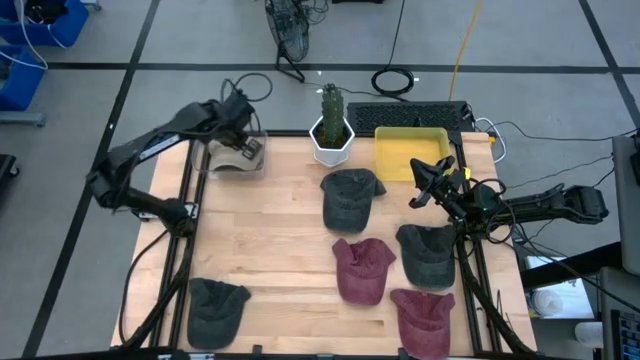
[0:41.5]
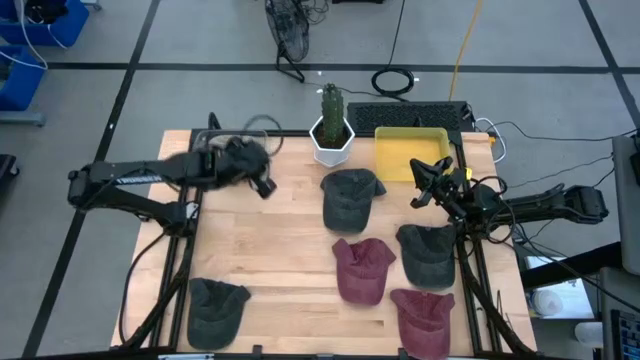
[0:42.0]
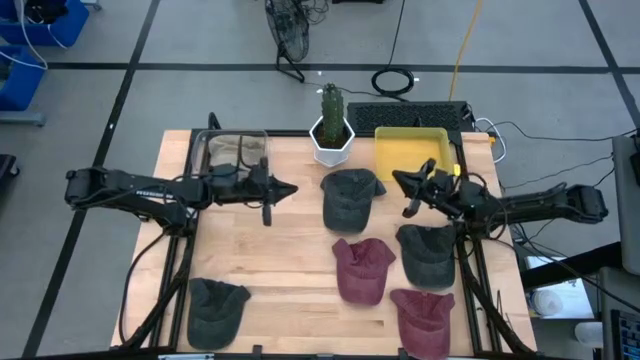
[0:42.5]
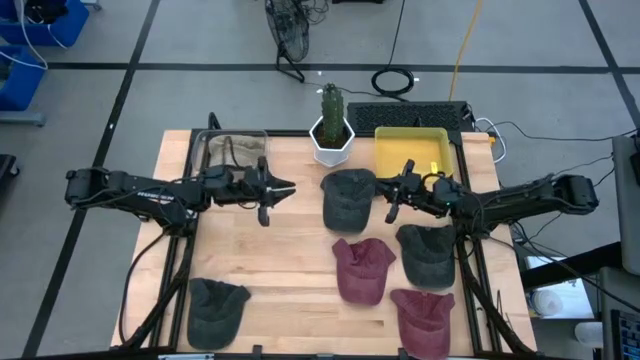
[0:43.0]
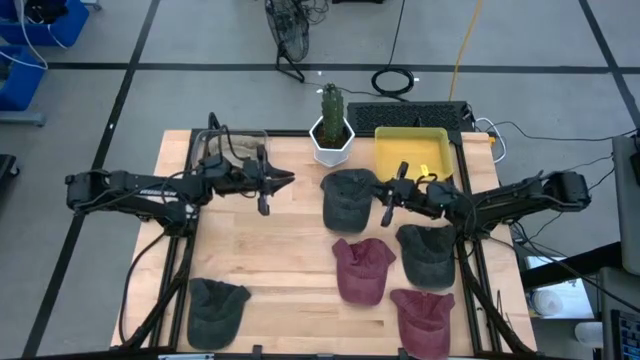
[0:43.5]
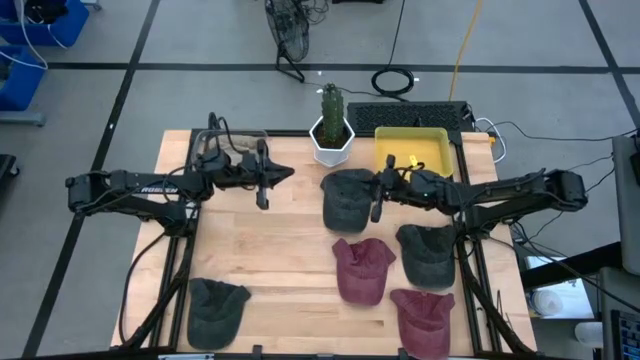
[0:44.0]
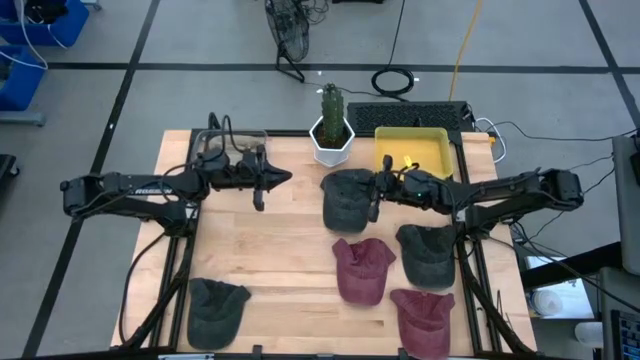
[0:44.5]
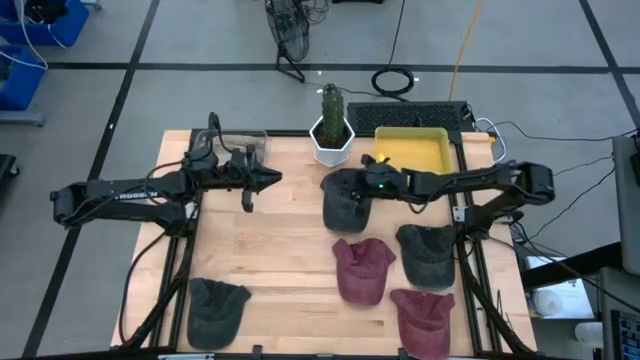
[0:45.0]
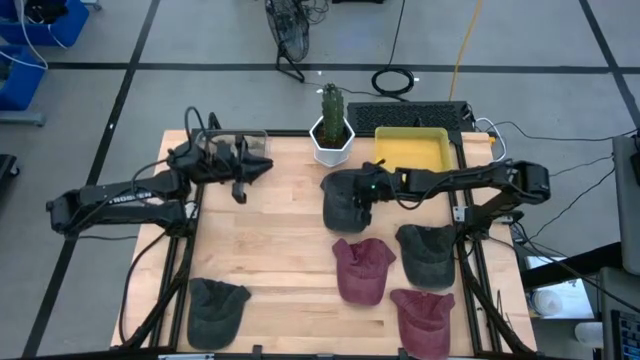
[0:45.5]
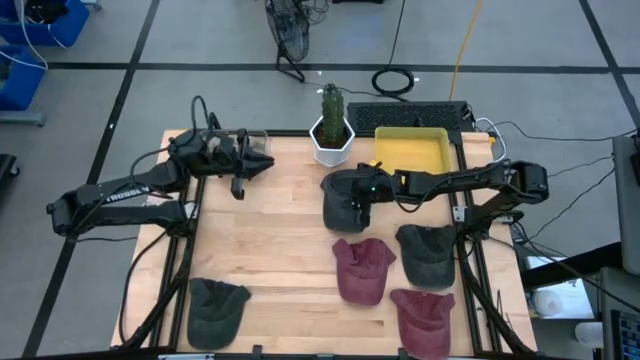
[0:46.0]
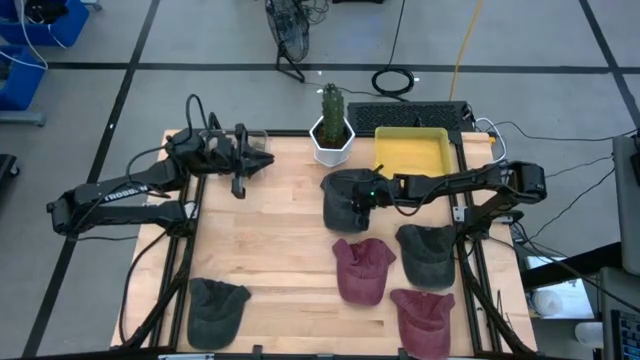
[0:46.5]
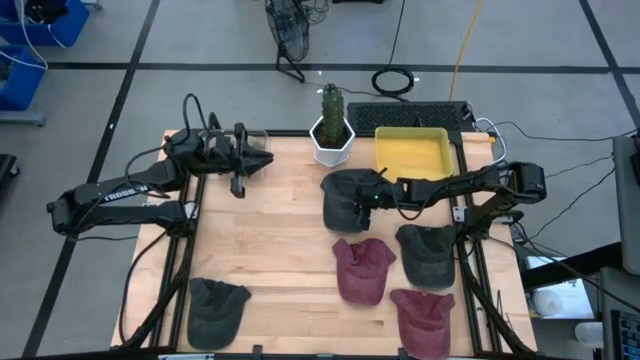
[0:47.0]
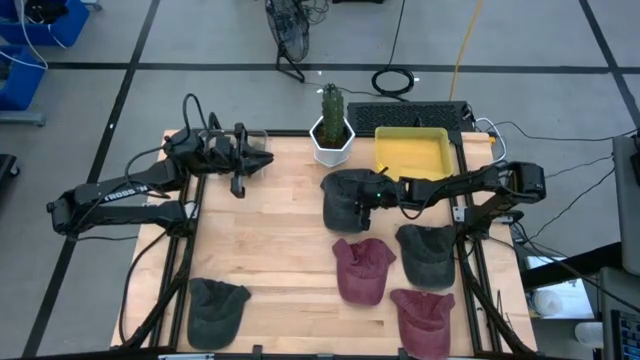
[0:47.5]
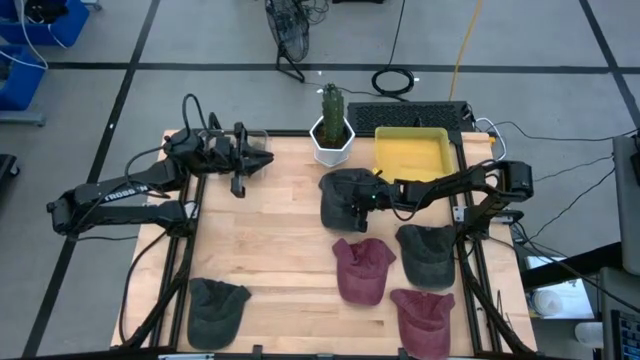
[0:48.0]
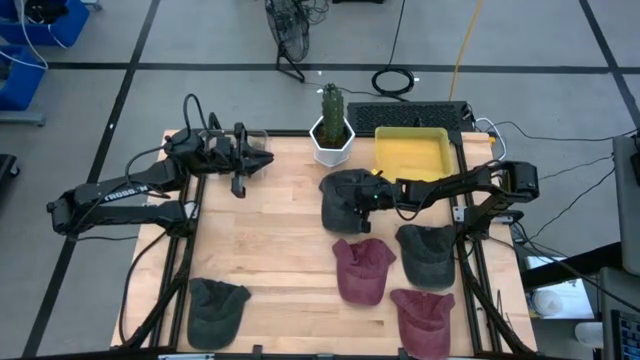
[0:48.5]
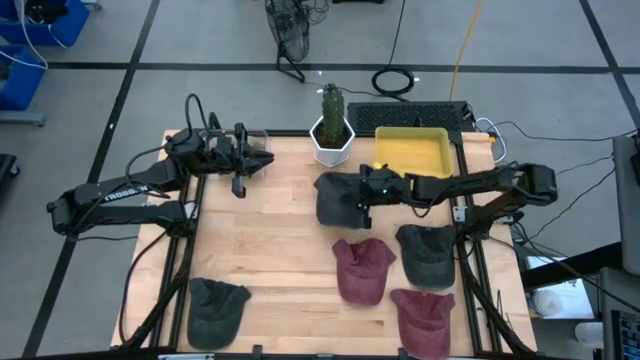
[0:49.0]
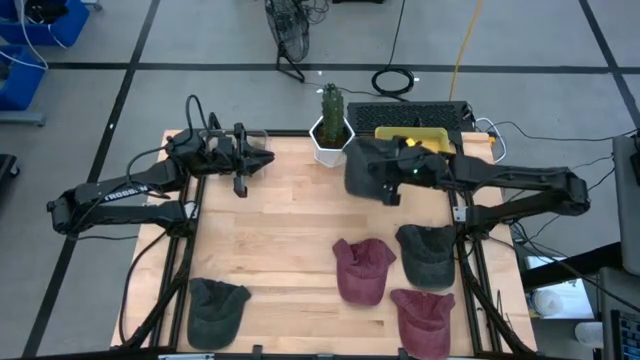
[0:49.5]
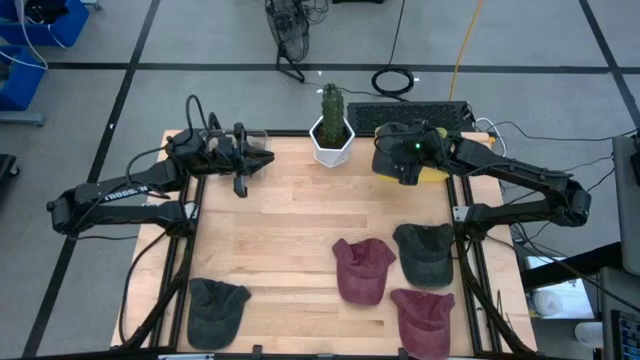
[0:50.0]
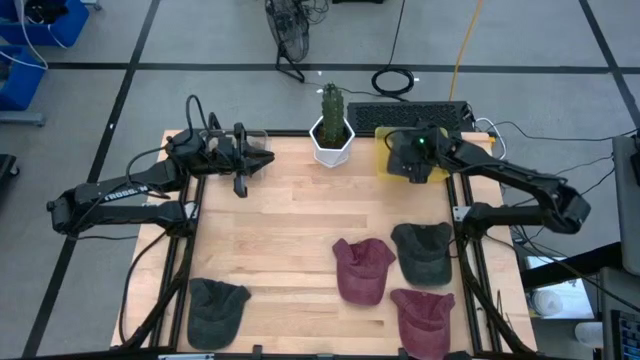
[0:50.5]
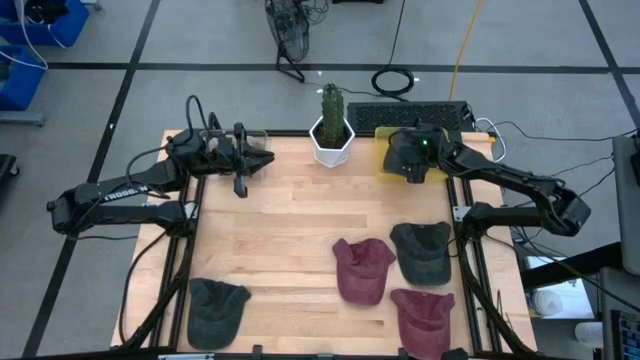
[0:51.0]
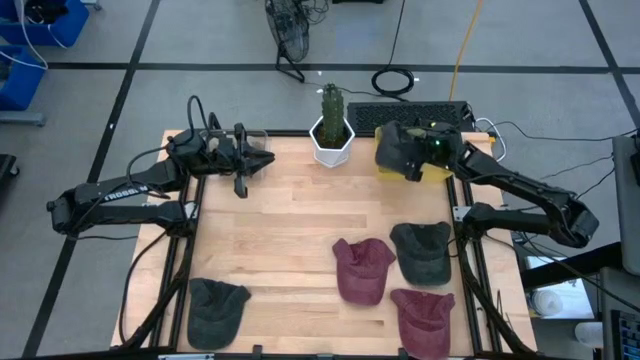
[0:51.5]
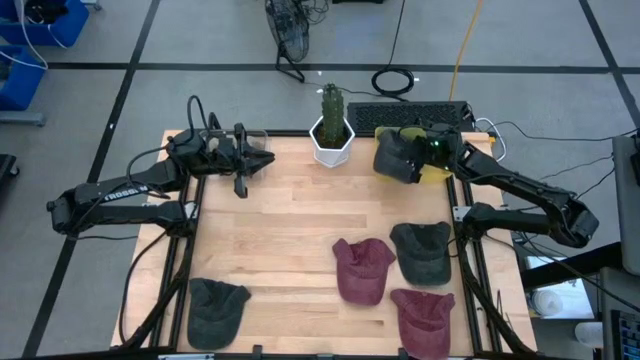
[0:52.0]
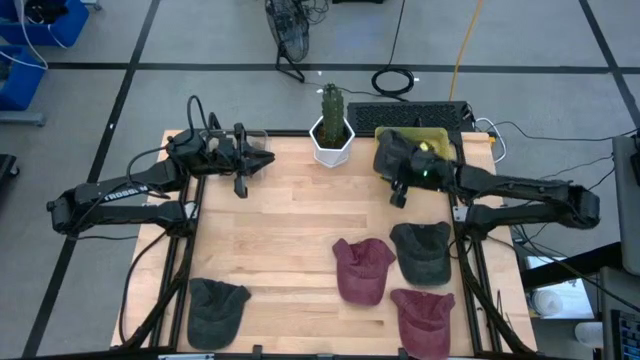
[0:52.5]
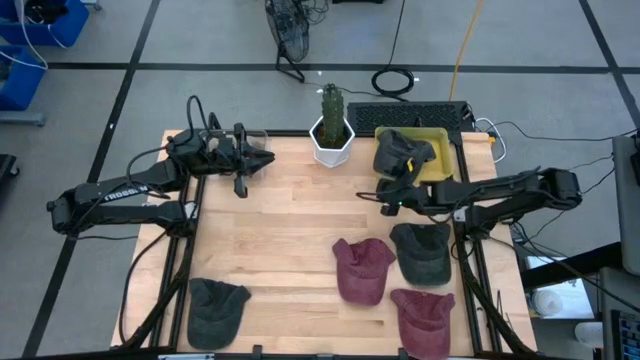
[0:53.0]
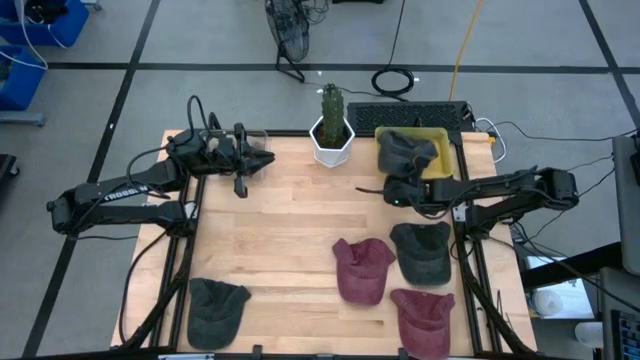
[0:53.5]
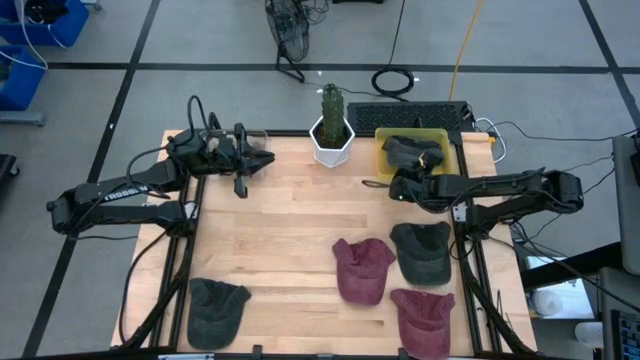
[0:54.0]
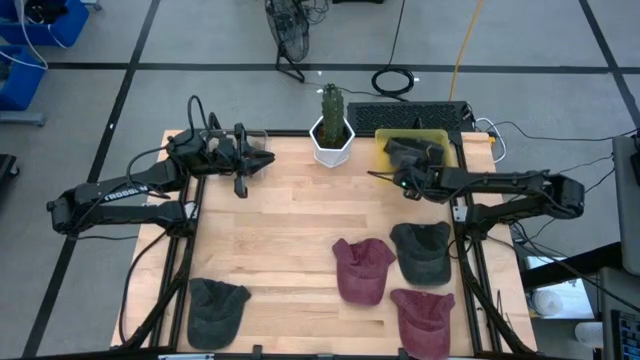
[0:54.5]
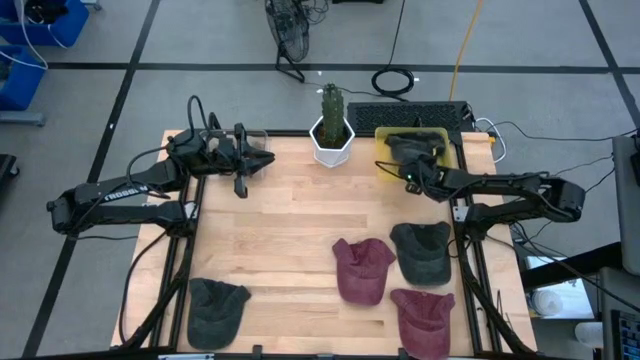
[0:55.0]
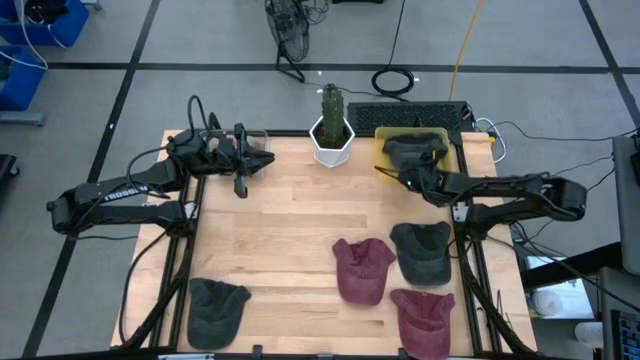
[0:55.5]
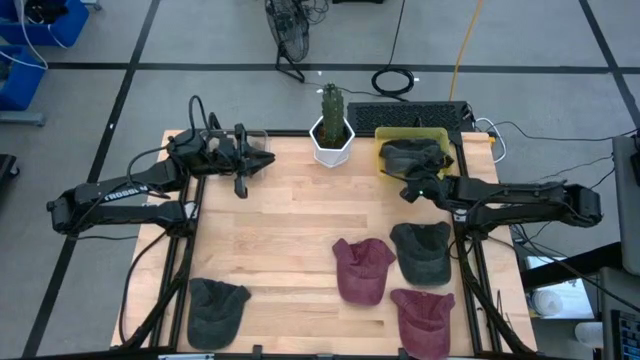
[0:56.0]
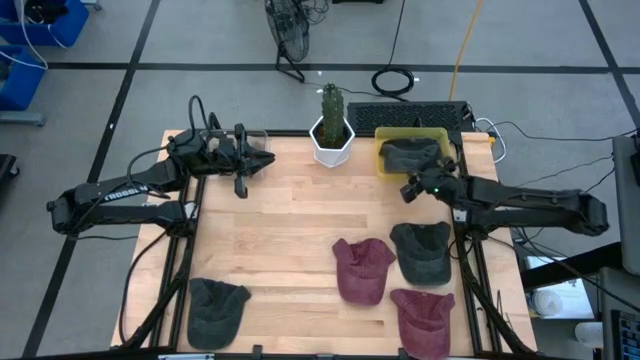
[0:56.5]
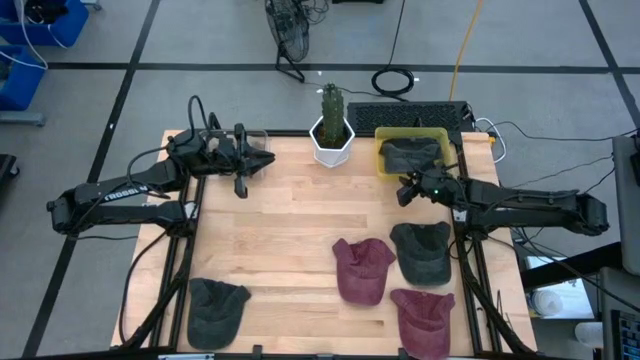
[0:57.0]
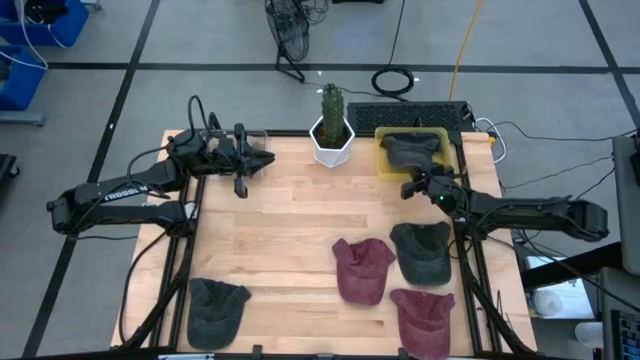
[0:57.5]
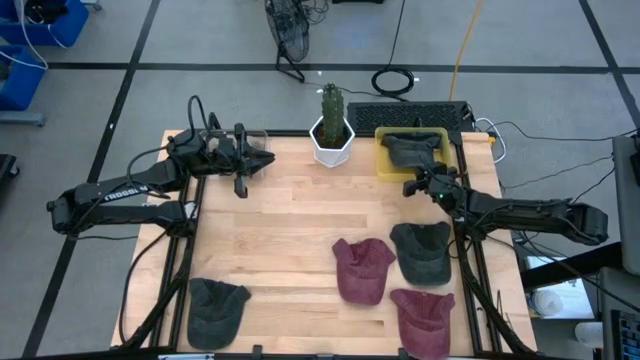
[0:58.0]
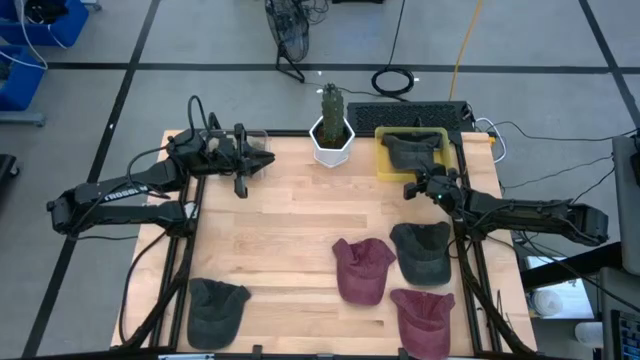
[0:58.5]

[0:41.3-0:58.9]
Task: Pick & Place hat
Put the top black cap into the yellow bin

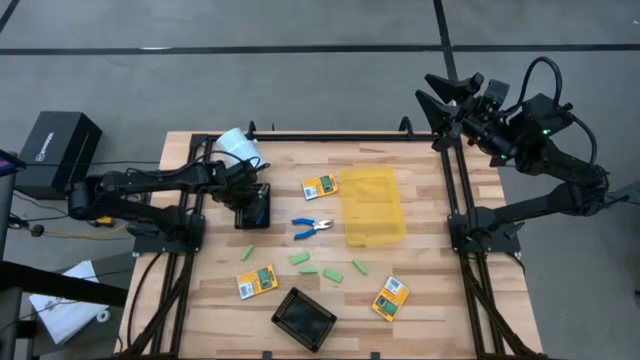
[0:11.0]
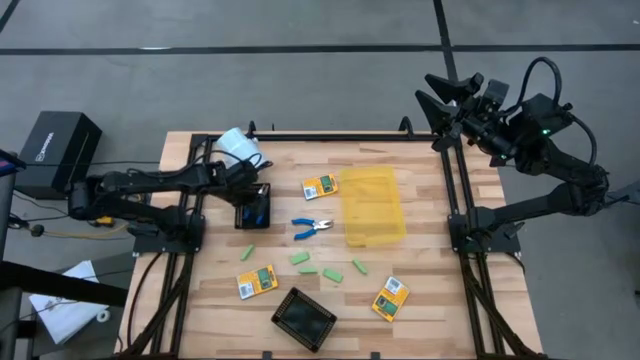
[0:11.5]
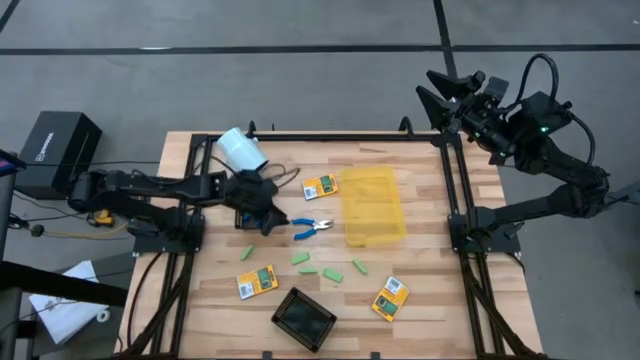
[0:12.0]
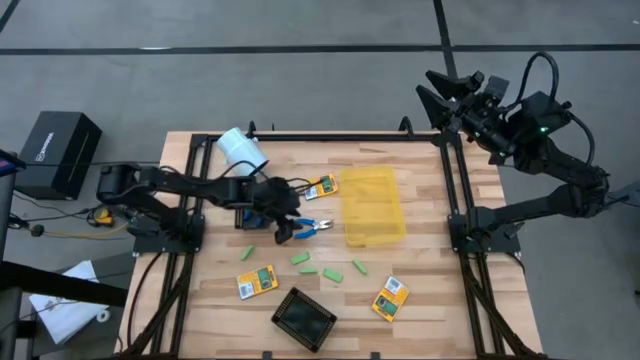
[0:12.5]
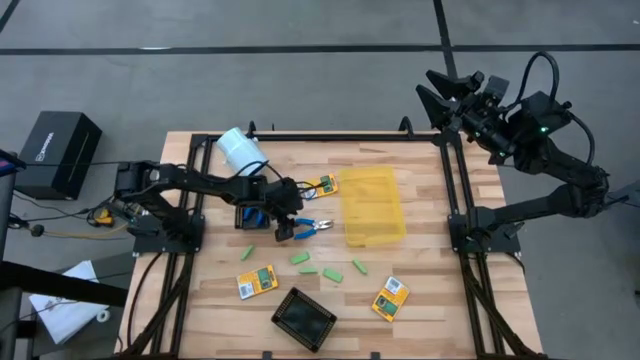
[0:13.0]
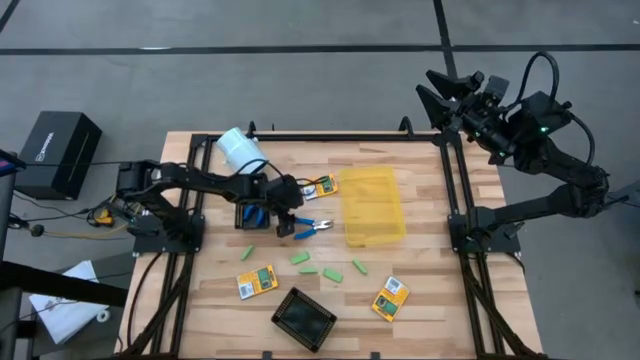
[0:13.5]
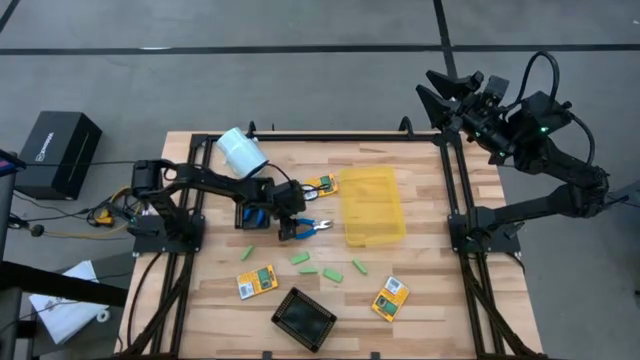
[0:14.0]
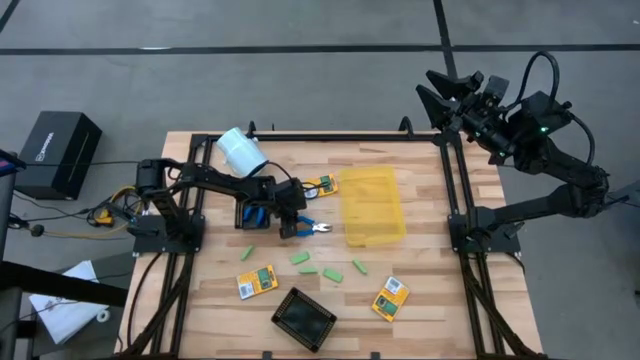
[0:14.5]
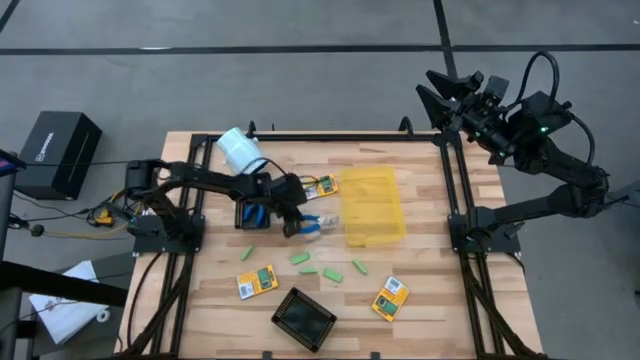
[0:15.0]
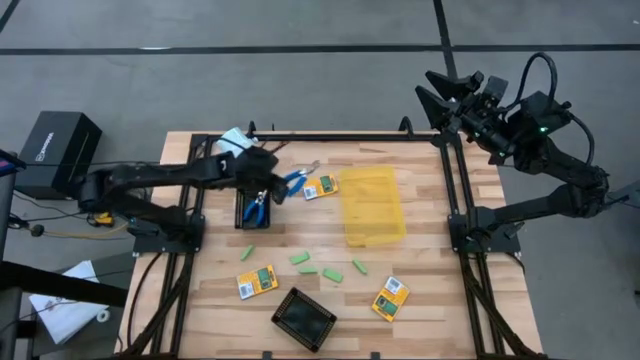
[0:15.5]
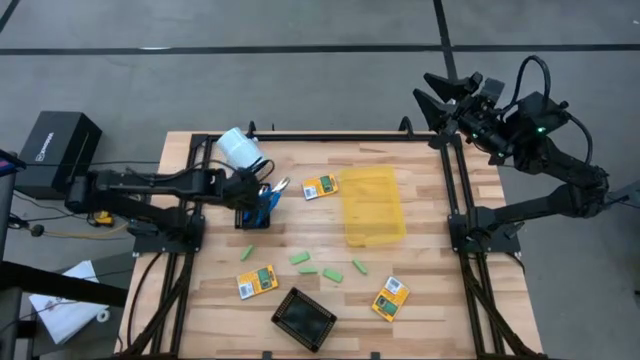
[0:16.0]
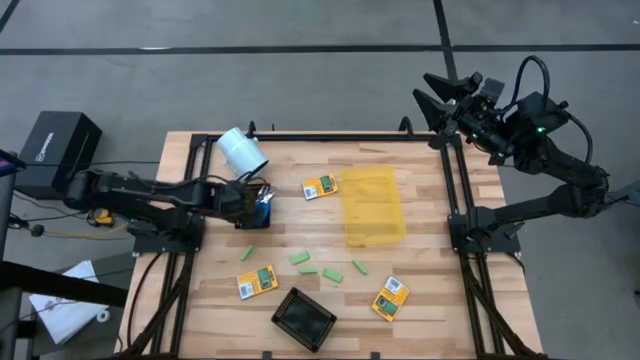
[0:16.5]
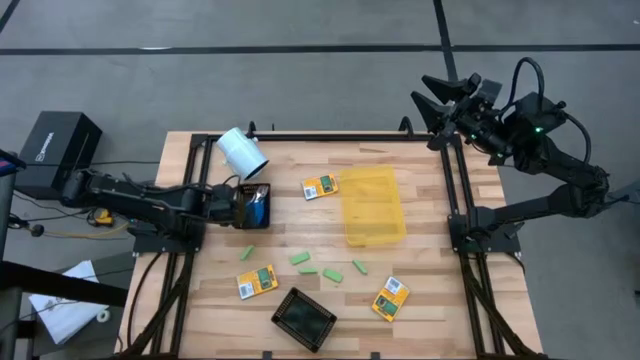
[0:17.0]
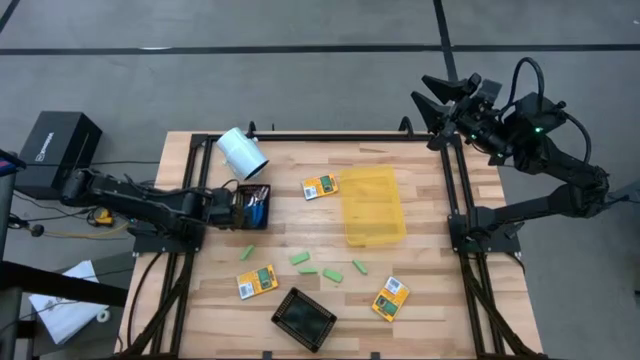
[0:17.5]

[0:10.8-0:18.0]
Task: Pick & Place School Supplies
Put the blue puncher into the top black bin
